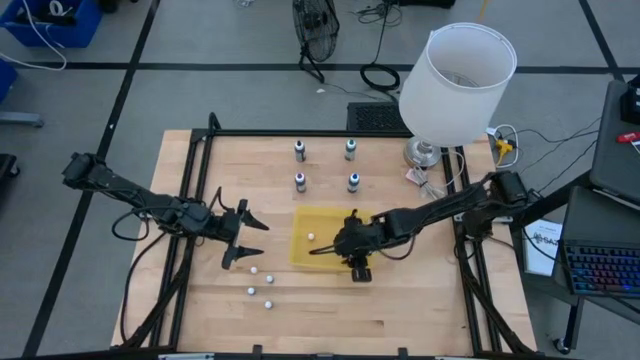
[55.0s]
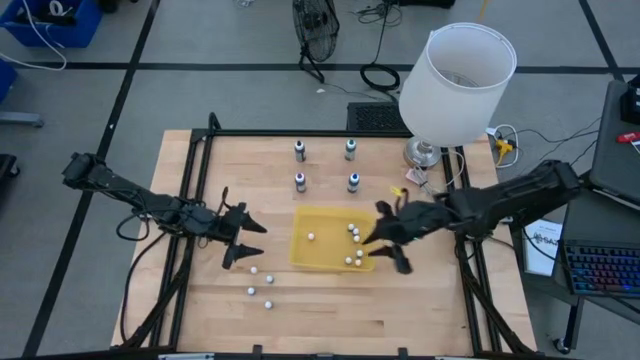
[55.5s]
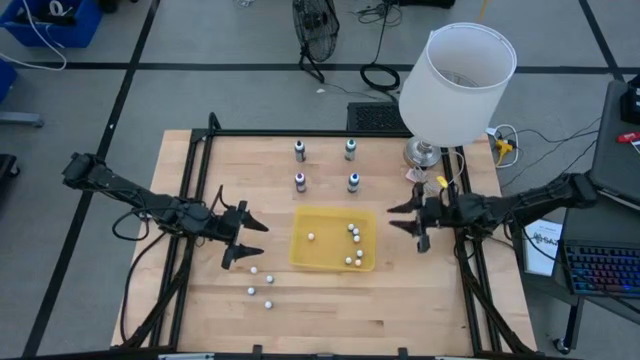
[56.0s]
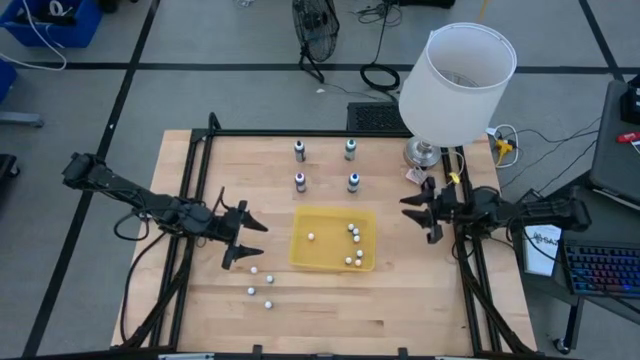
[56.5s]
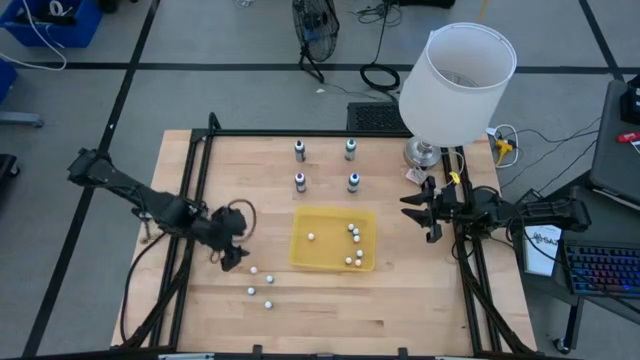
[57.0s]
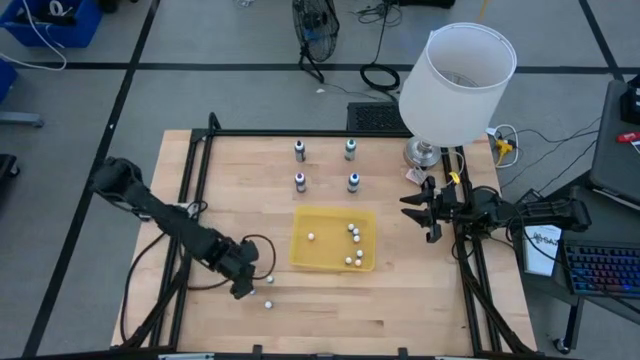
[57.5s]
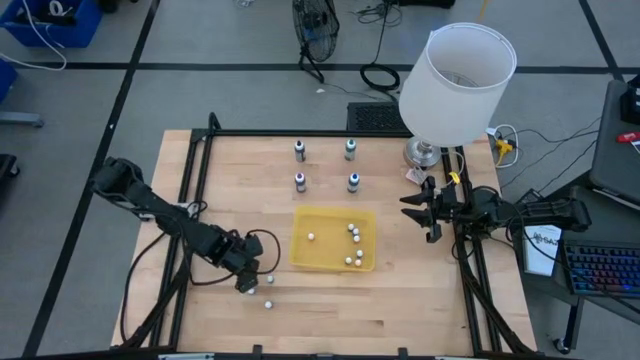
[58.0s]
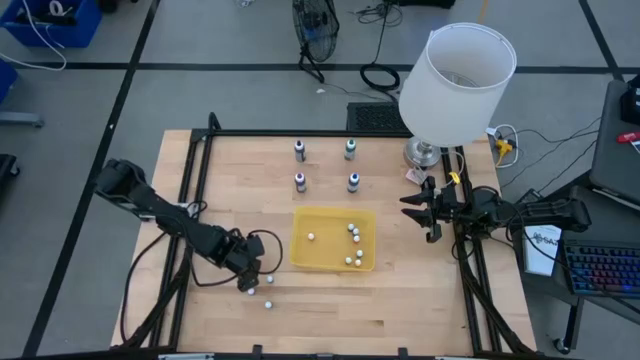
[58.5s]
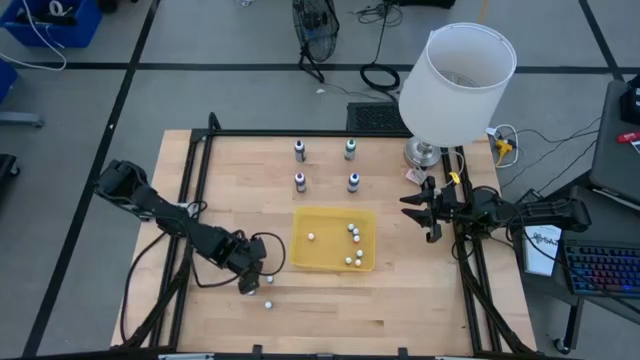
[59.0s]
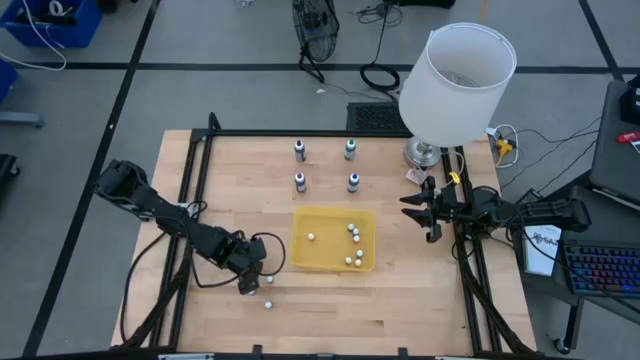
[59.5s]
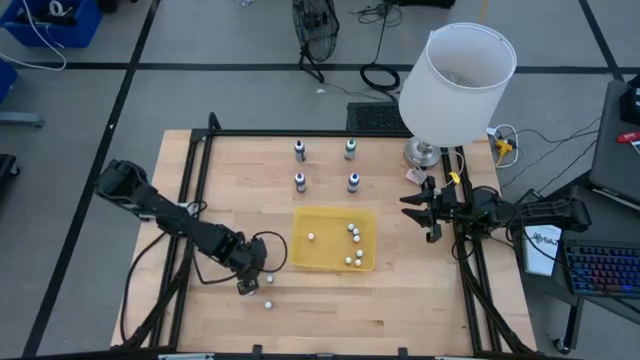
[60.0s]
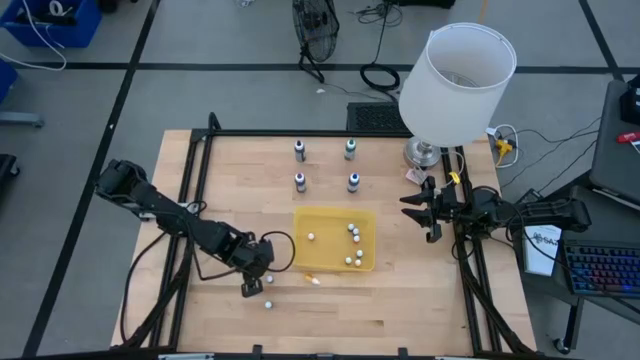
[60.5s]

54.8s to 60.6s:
Task: Pick & Place food coloring
Put the small yellow food coloring bottle into the yellow container

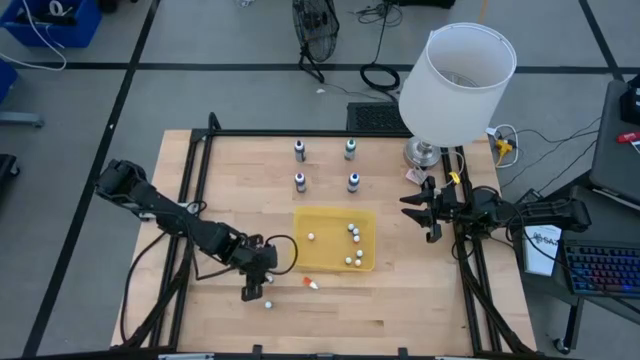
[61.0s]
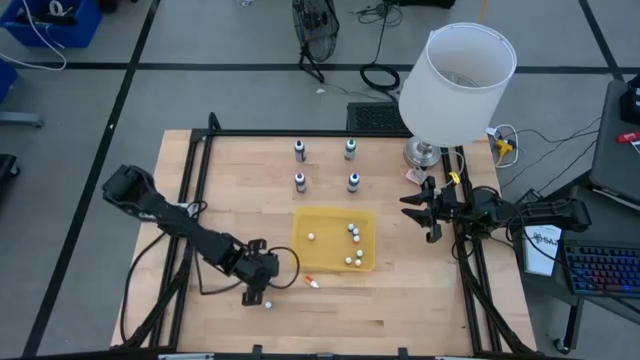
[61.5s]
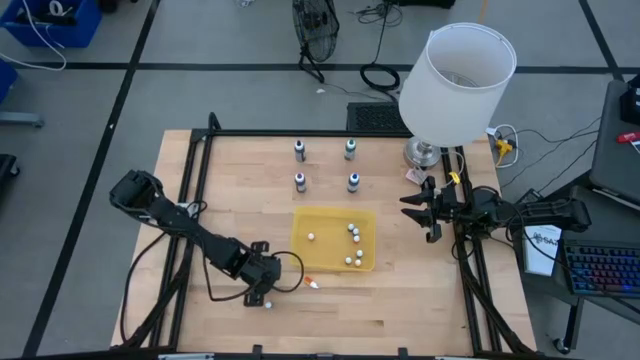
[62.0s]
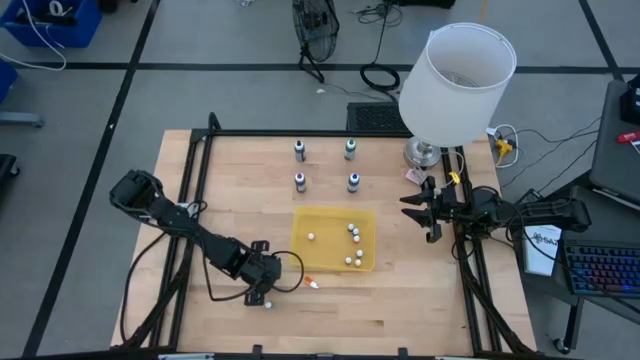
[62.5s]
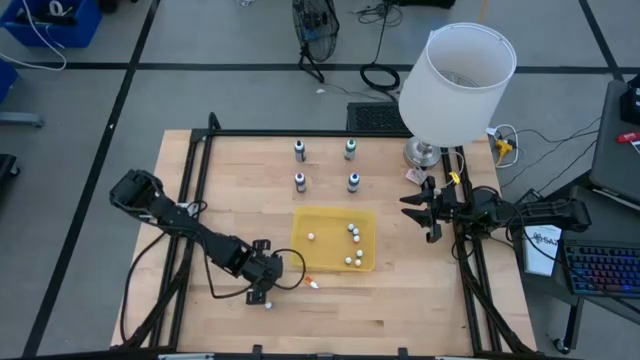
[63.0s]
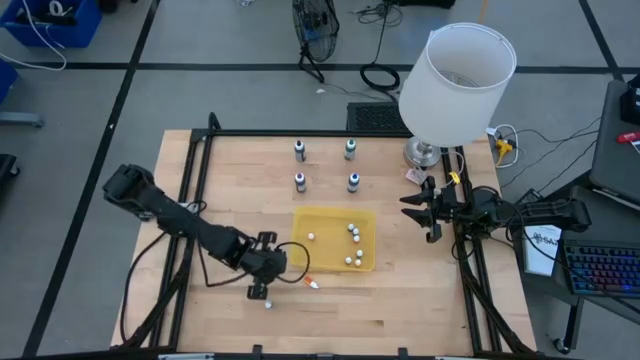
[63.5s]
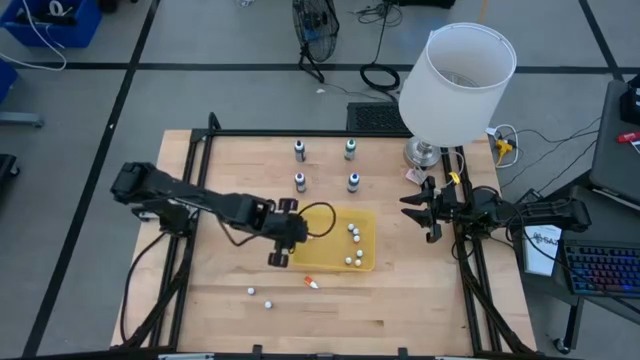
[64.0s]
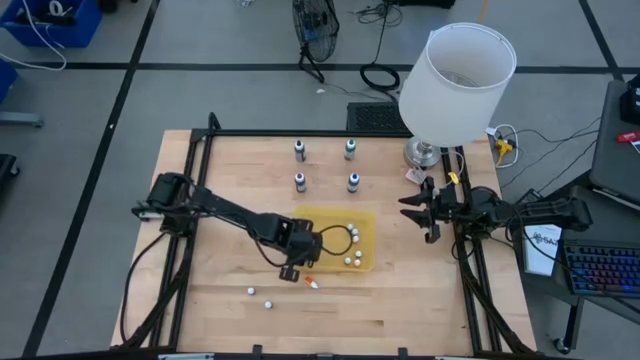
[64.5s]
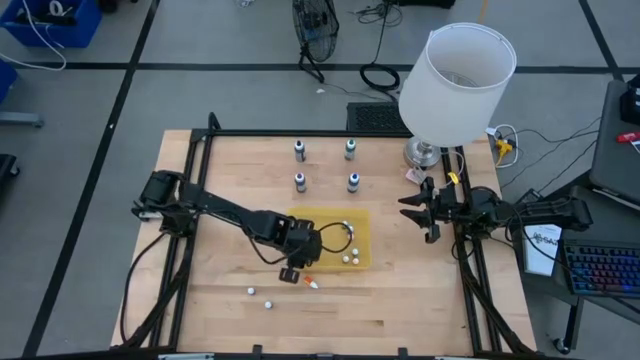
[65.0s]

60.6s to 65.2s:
Put the small blue food coloring bottle into the yellow container

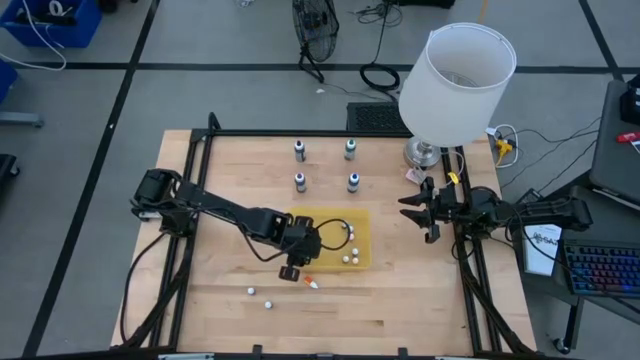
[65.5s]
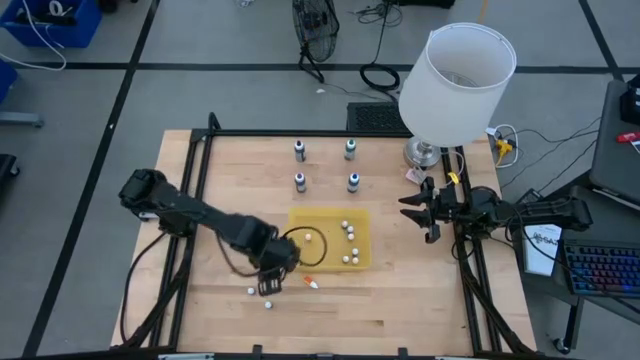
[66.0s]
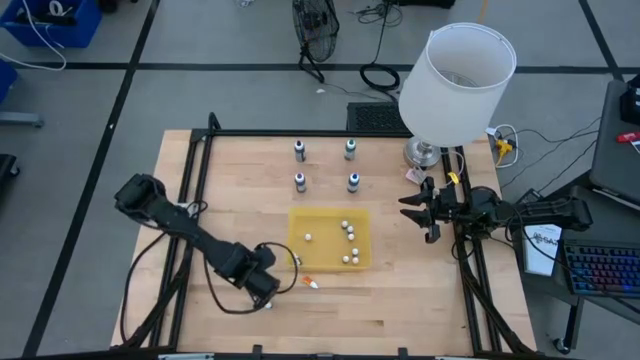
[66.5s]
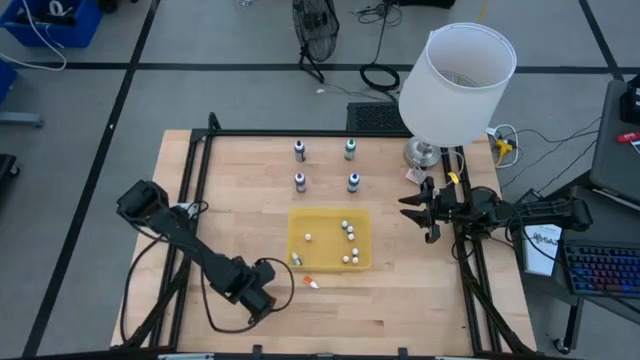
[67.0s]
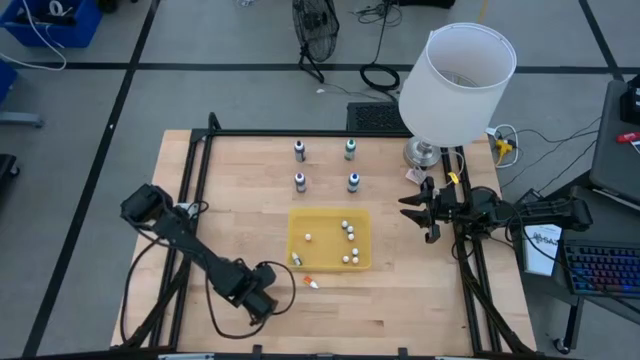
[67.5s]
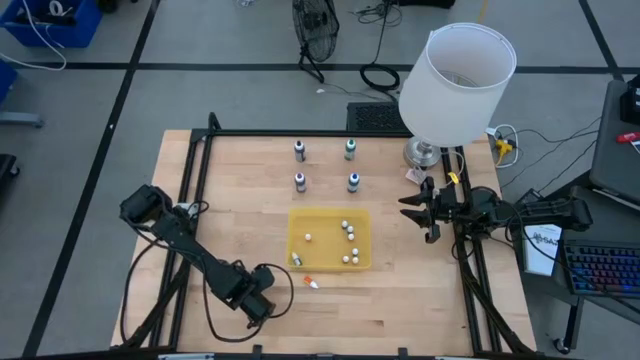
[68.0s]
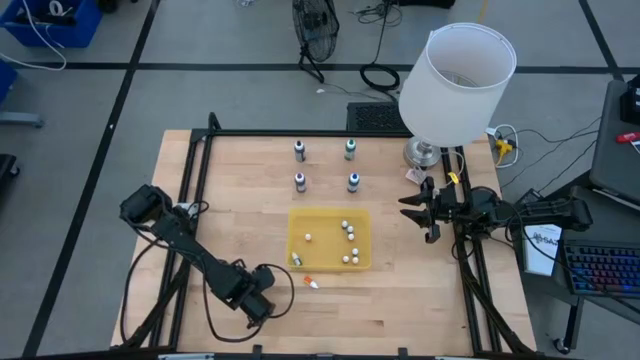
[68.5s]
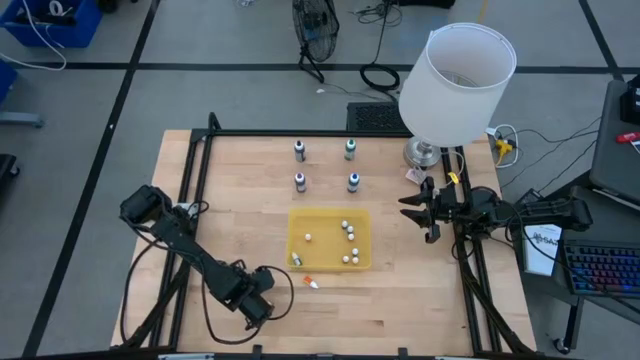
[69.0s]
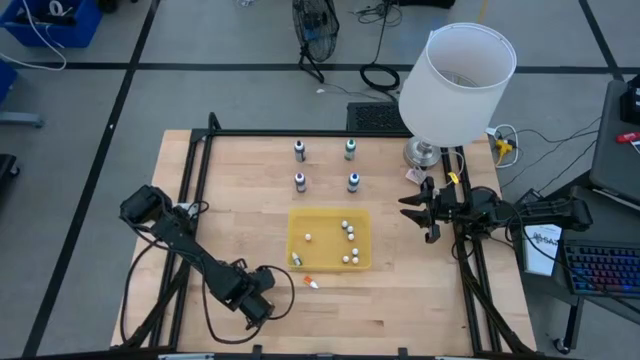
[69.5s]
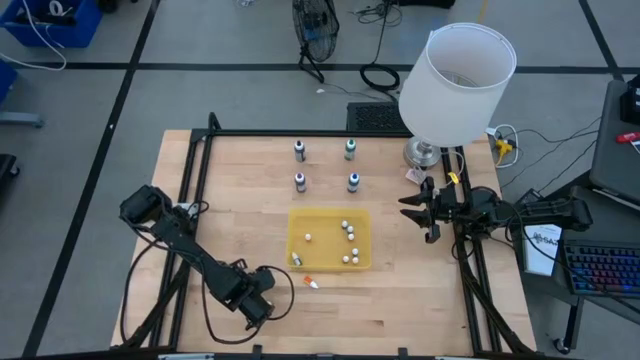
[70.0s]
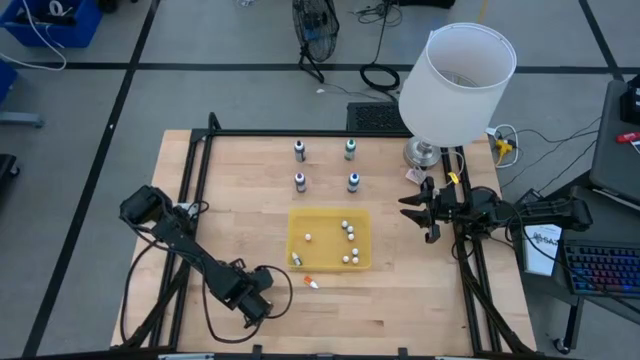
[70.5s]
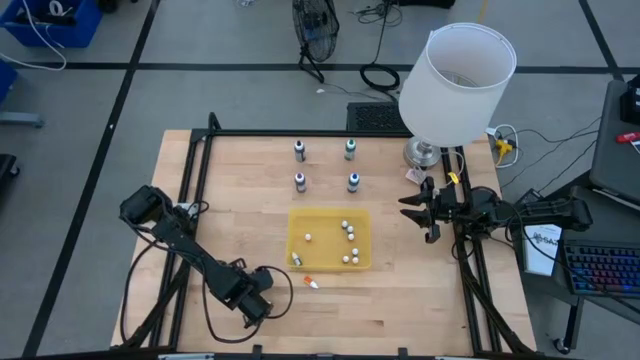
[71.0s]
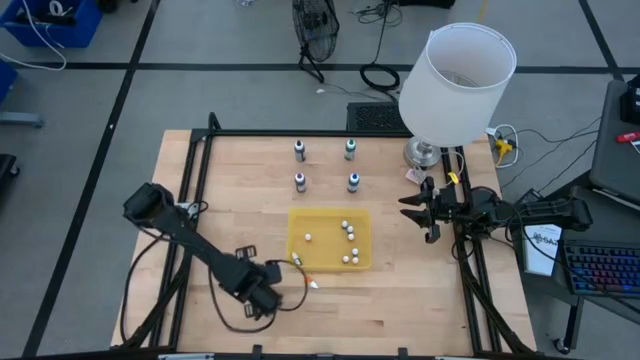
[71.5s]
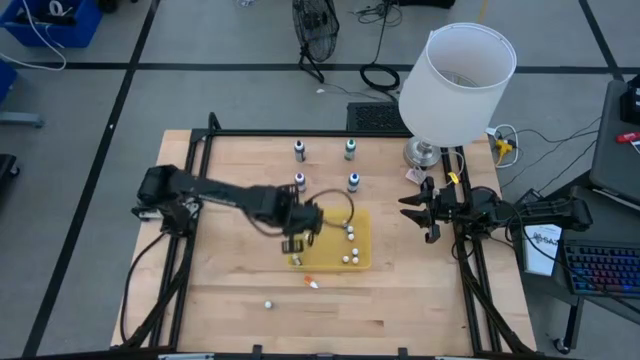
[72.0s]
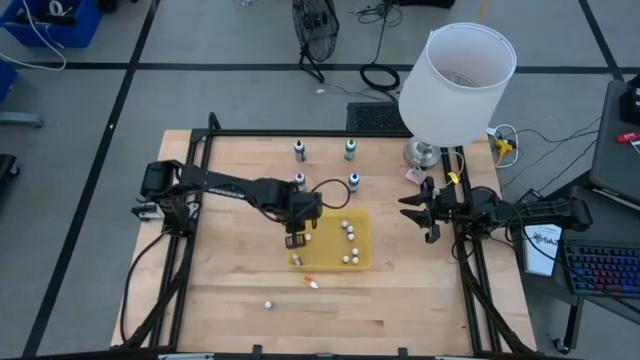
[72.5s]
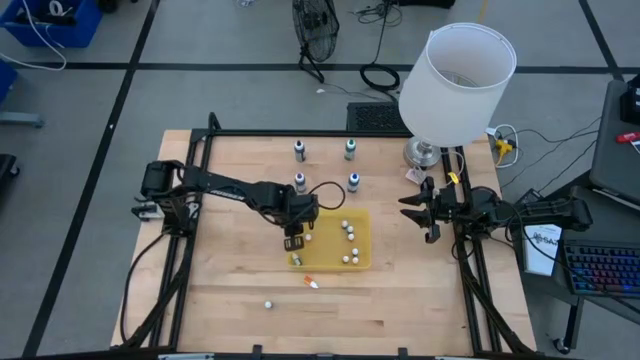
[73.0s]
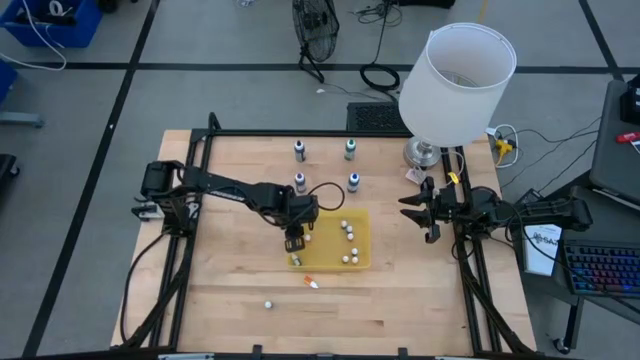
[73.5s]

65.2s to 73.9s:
Put the small red food coloring bottle into the yellow container

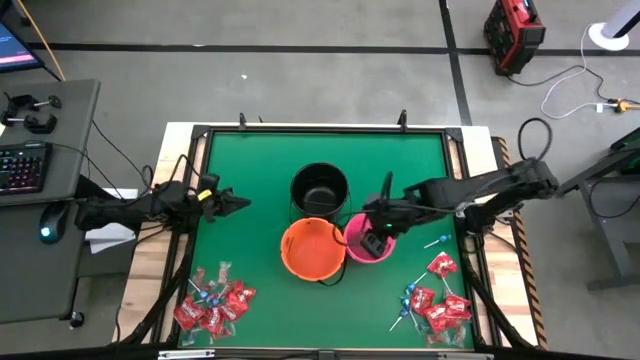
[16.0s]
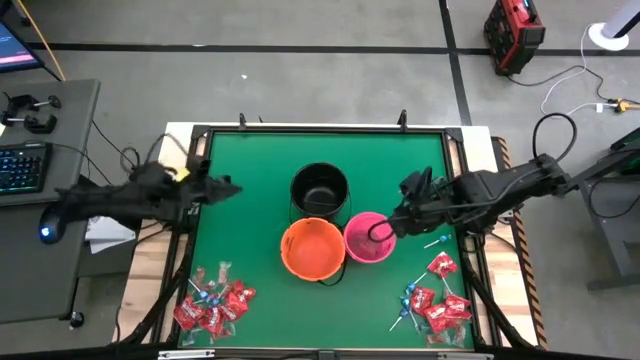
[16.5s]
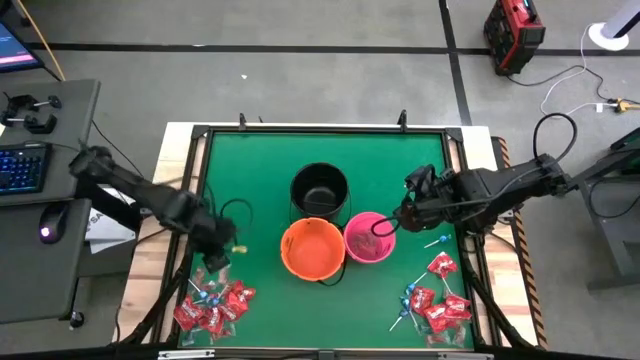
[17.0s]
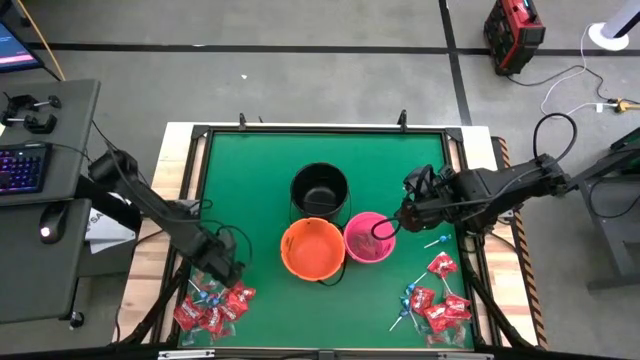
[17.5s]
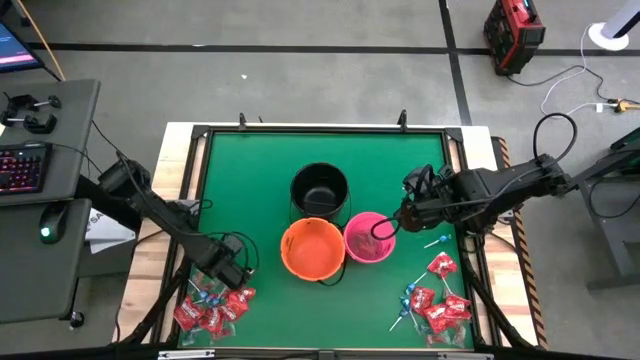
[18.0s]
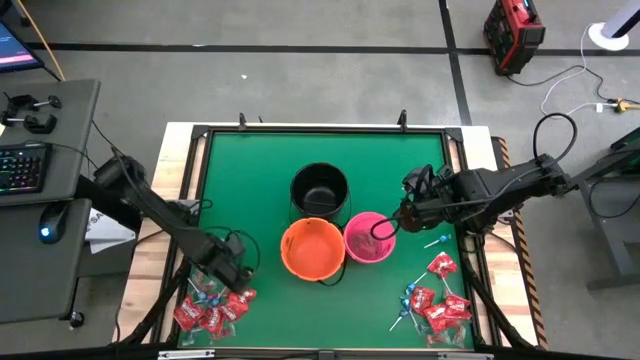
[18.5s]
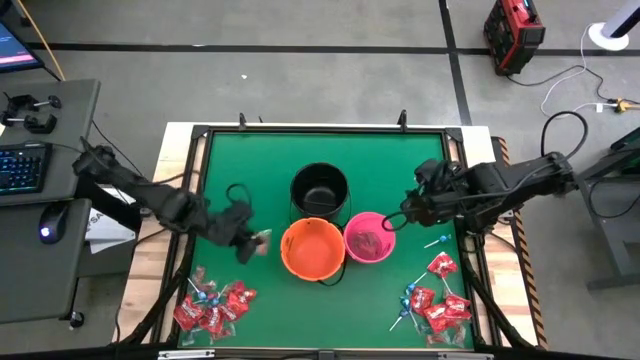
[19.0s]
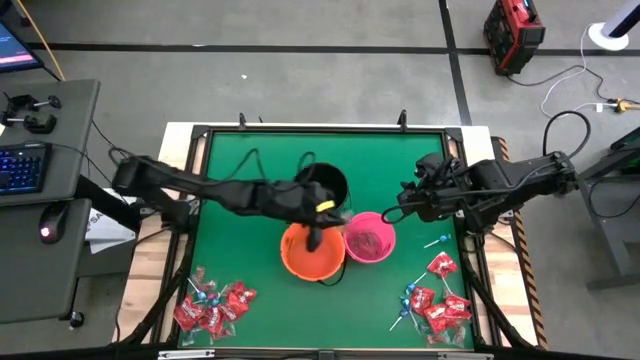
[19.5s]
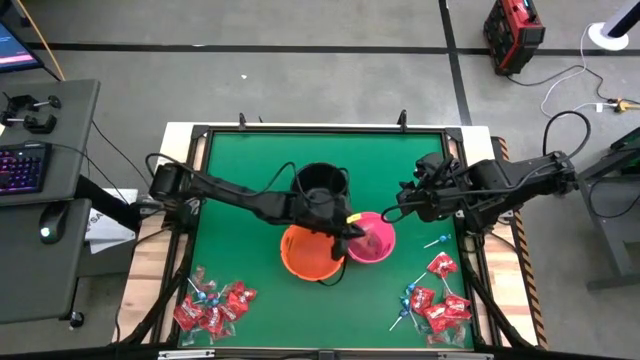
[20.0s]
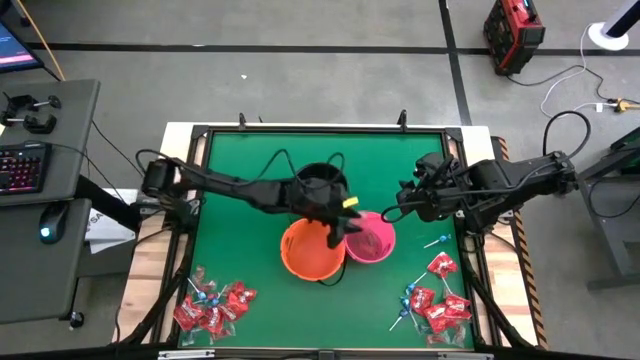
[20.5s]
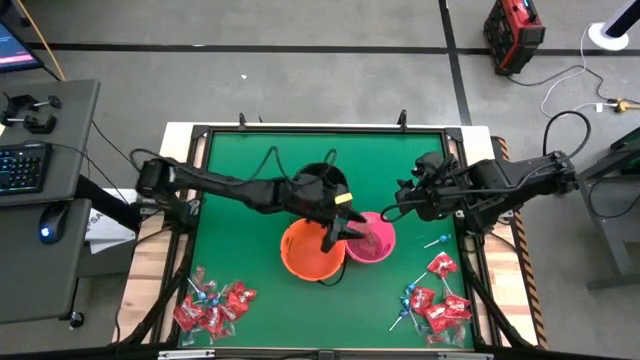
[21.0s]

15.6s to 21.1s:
Task: Sort candy by brand, put in halloween buckets
Put the orange gummy into the pink bucket
